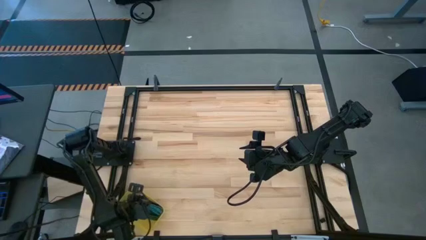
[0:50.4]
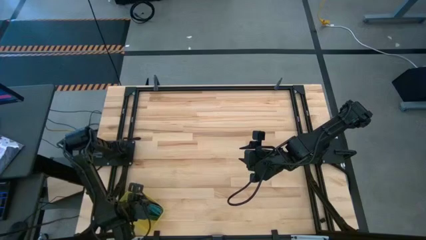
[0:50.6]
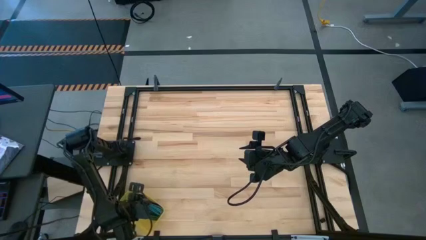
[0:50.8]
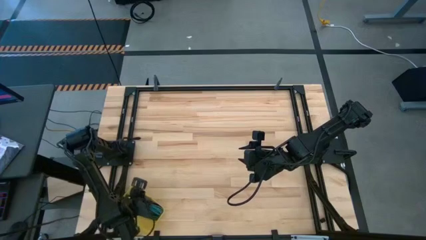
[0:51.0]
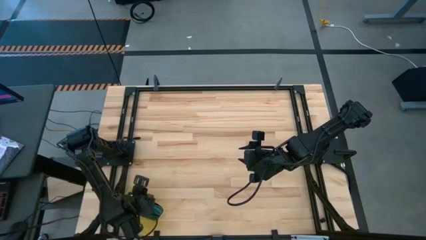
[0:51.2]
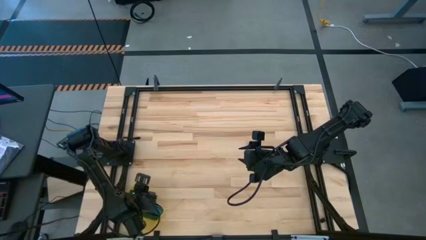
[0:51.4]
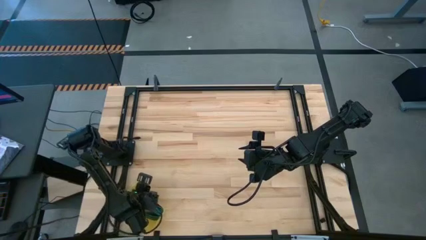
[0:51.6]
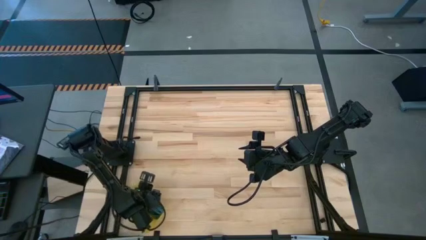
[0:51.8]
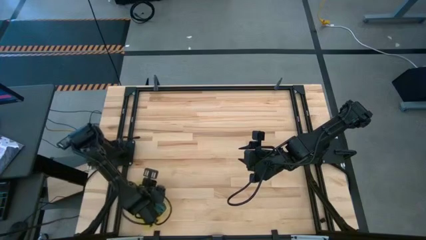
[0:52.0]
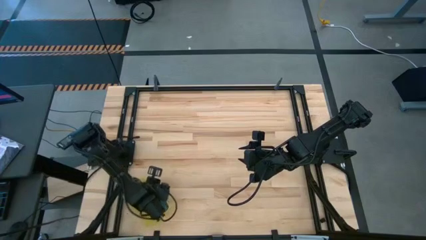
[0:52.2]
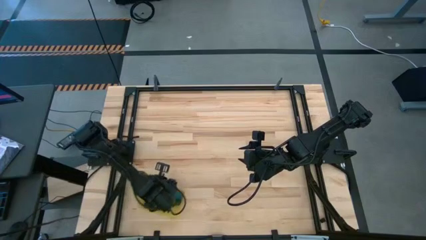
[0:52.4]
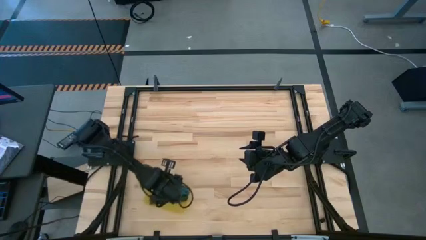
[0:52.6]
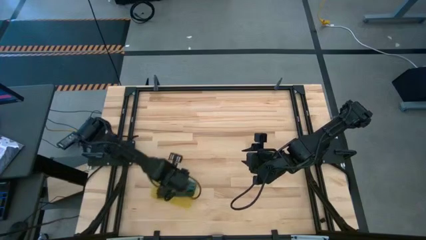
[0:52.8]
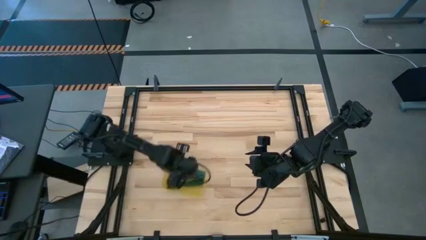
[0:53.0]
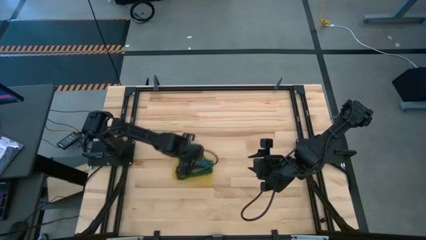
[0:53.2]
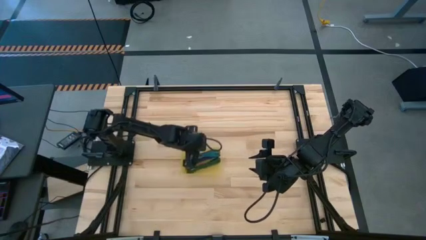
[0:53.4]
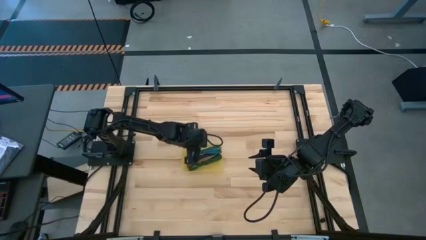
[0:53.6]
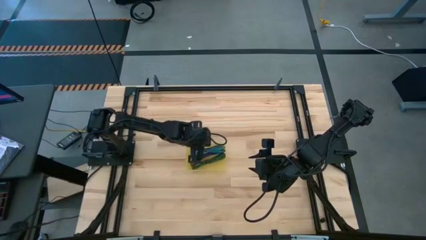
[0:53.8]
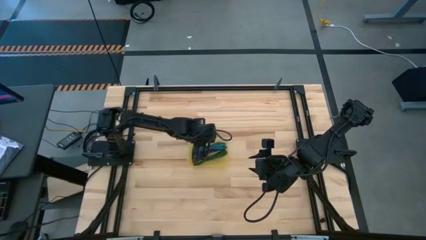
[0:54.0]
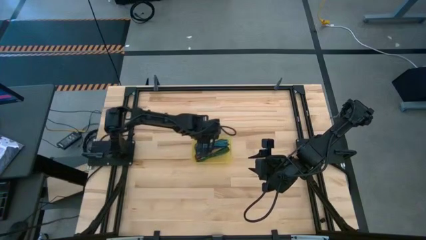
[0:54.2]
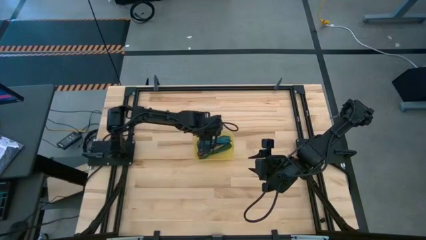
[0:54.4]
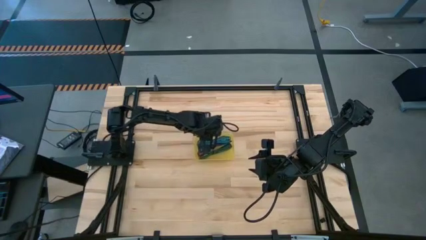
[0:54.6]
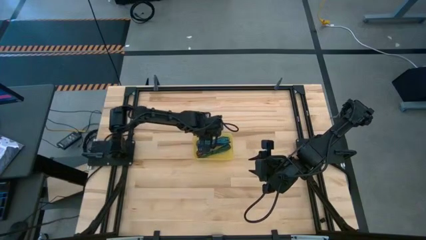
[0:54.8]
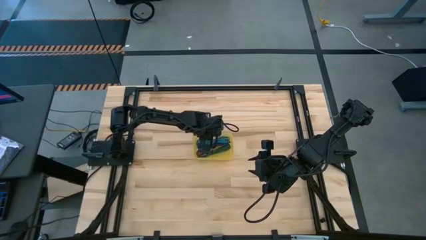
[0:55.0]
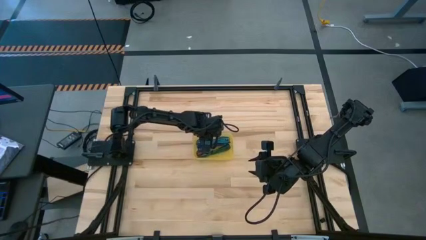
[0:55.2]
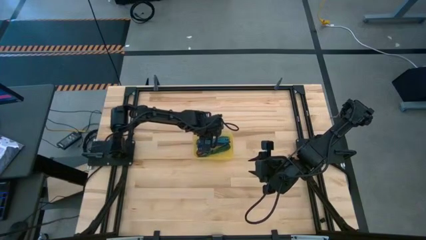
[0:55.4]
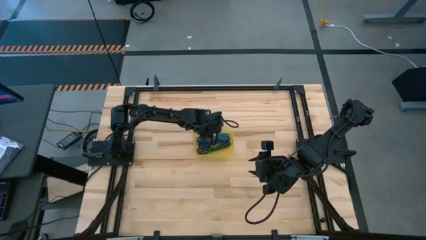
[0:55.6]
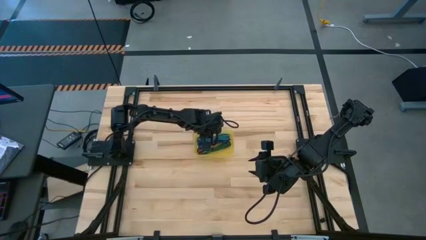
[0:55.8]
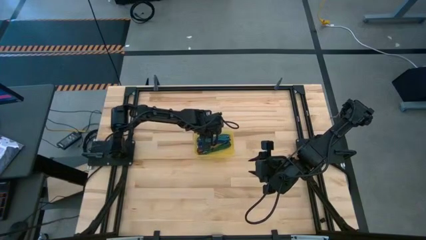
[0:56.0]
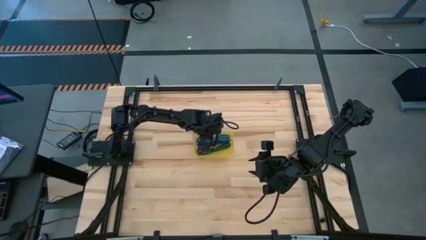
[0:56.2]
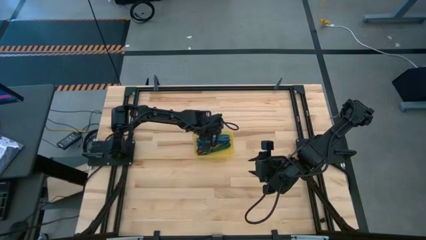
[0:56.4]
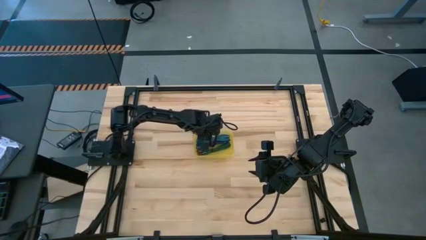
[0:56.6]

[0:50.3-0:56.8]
Task: Pick and place USB-C Cables
Move the yellow bin to the center of the table

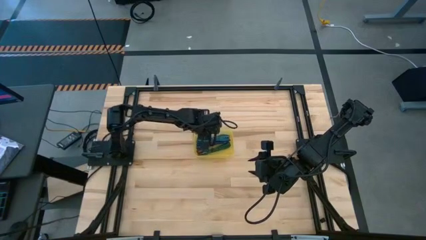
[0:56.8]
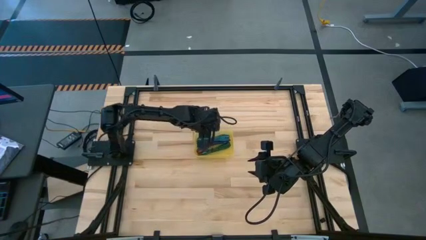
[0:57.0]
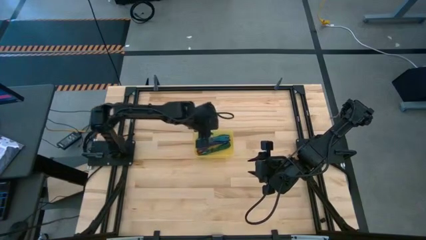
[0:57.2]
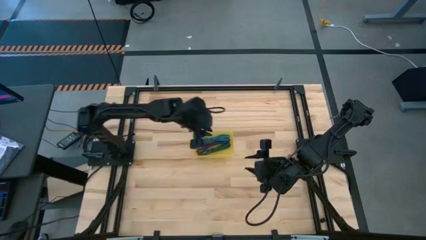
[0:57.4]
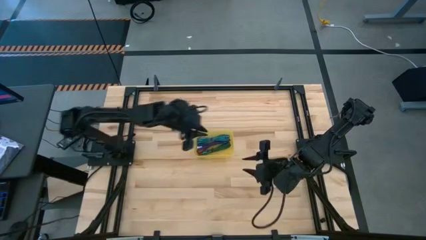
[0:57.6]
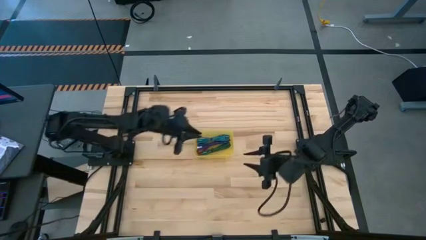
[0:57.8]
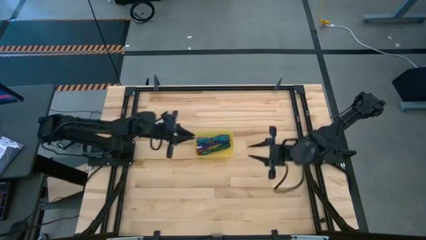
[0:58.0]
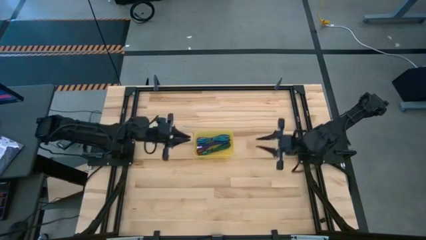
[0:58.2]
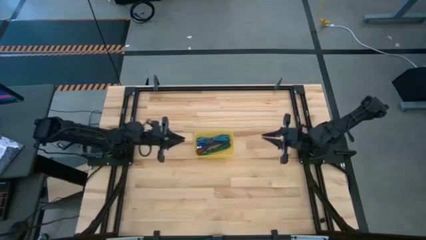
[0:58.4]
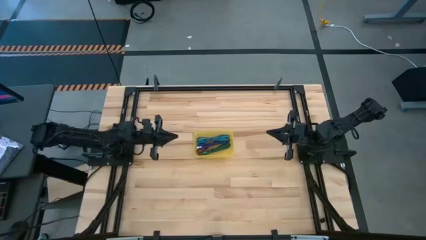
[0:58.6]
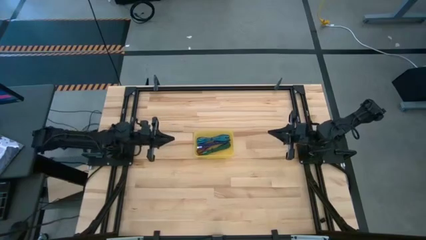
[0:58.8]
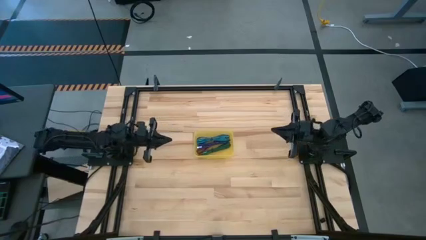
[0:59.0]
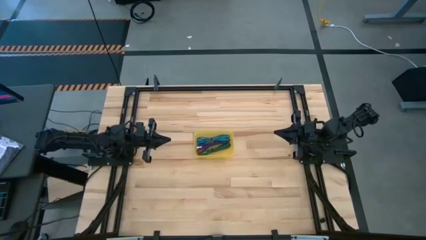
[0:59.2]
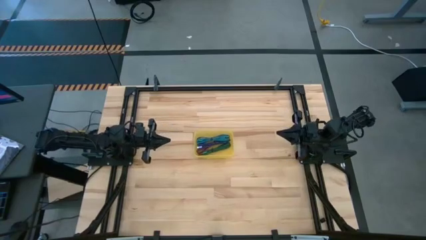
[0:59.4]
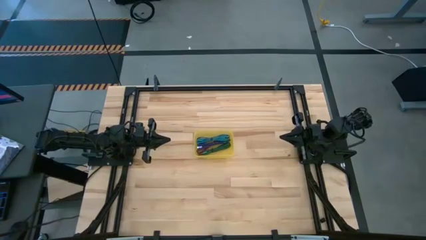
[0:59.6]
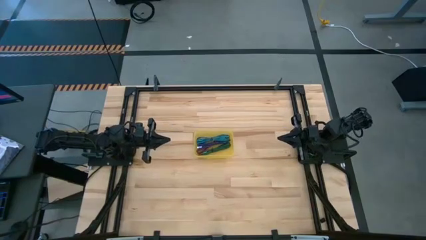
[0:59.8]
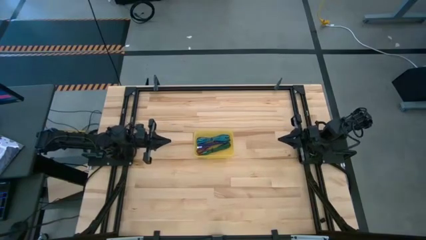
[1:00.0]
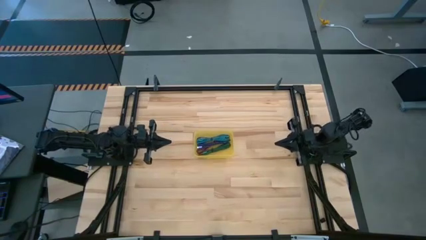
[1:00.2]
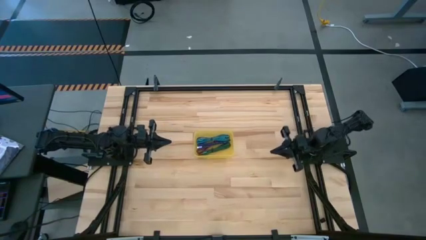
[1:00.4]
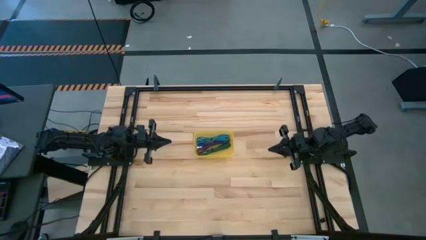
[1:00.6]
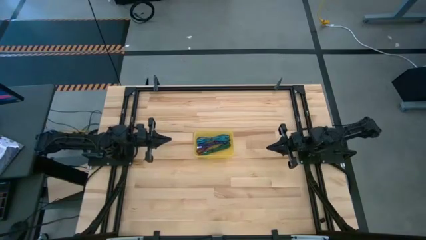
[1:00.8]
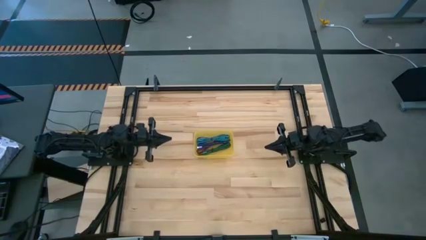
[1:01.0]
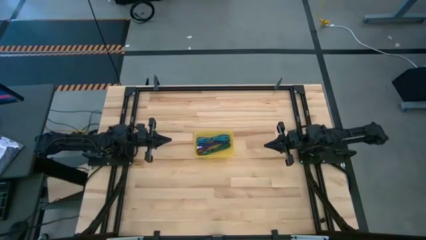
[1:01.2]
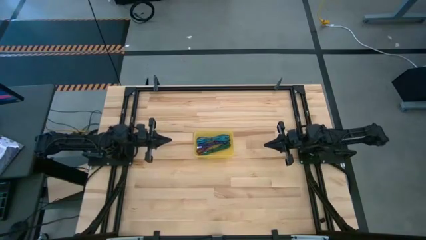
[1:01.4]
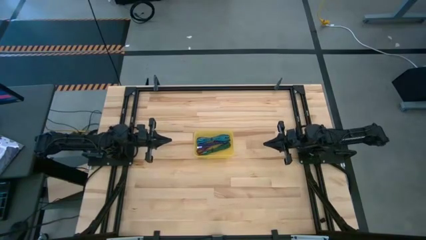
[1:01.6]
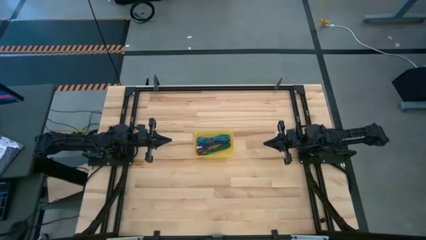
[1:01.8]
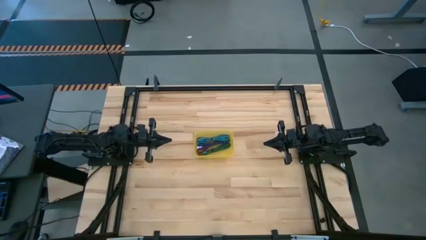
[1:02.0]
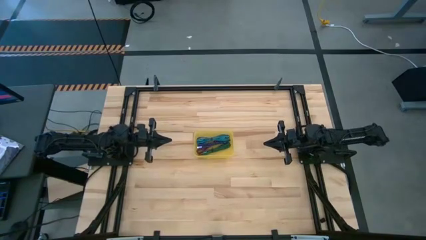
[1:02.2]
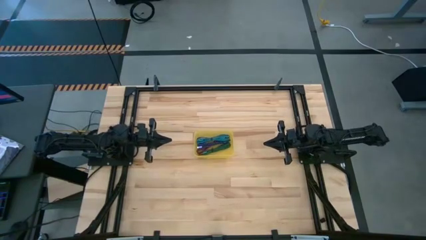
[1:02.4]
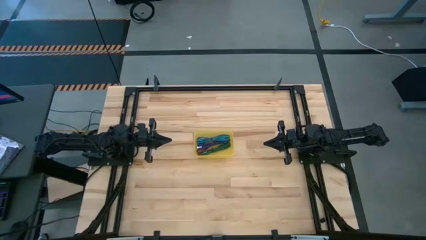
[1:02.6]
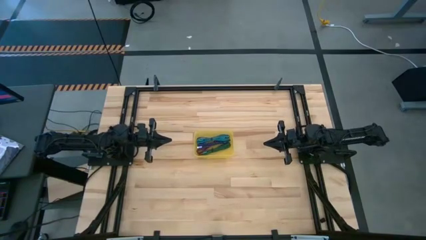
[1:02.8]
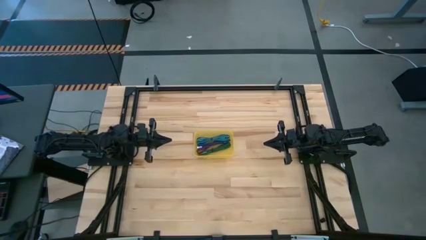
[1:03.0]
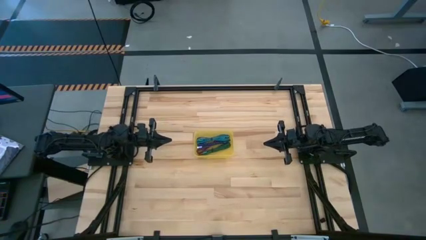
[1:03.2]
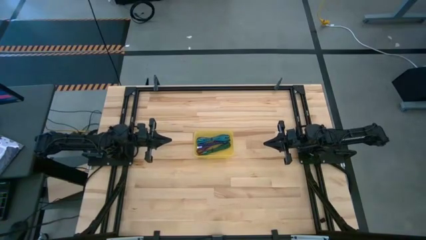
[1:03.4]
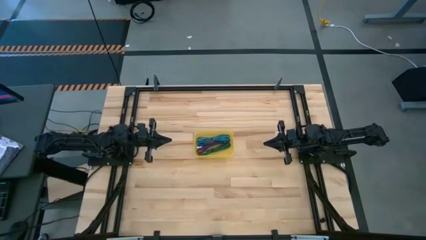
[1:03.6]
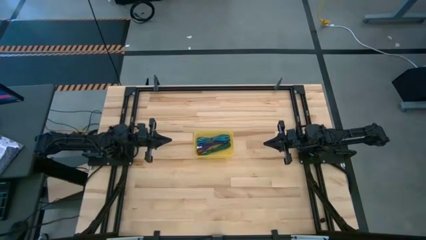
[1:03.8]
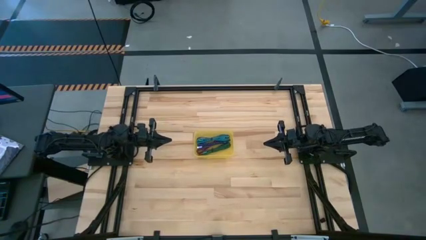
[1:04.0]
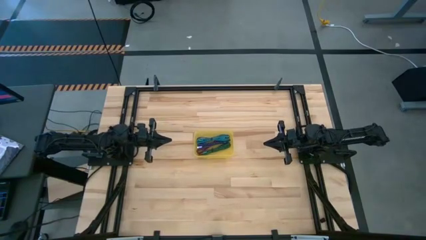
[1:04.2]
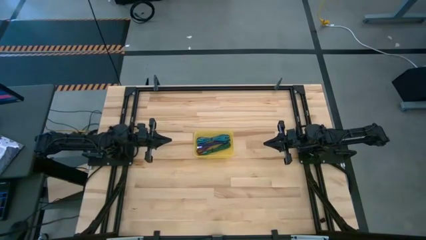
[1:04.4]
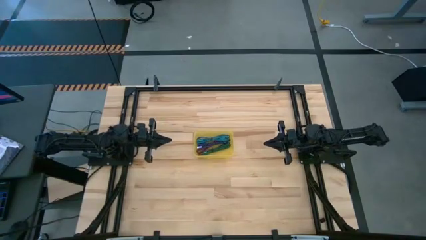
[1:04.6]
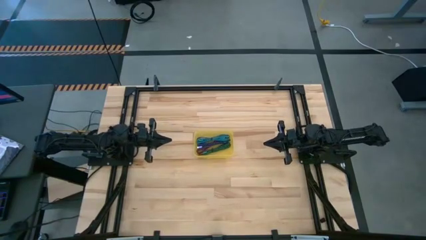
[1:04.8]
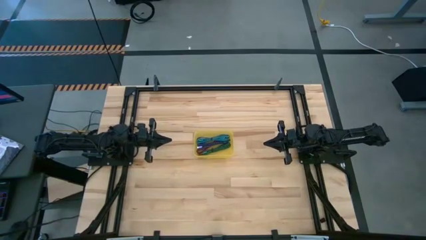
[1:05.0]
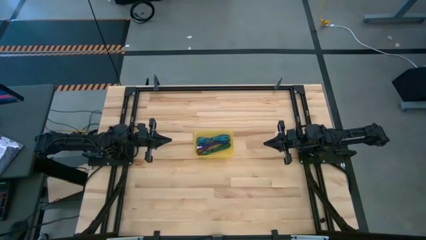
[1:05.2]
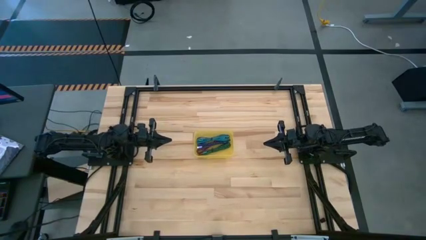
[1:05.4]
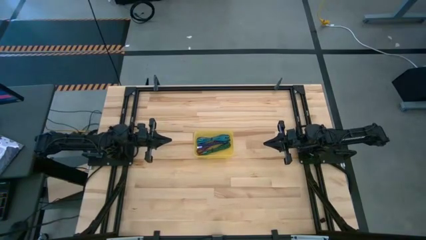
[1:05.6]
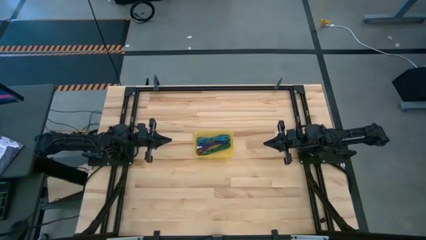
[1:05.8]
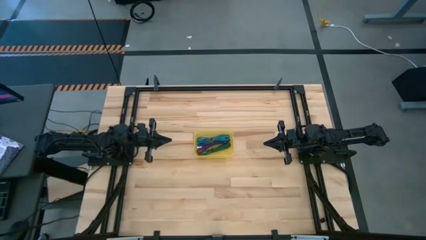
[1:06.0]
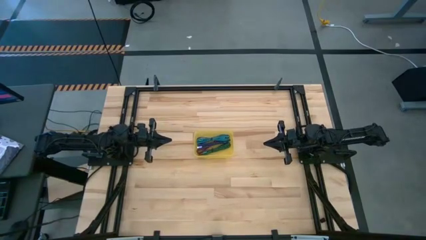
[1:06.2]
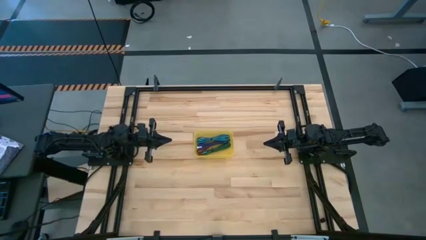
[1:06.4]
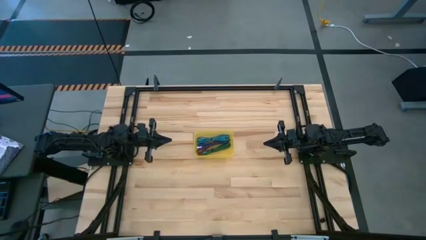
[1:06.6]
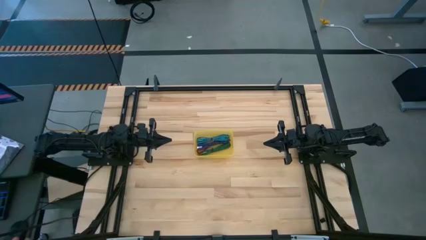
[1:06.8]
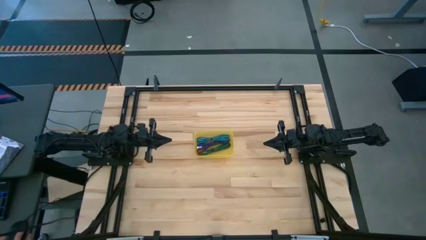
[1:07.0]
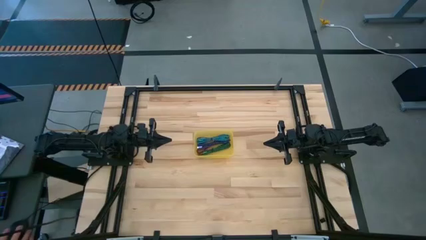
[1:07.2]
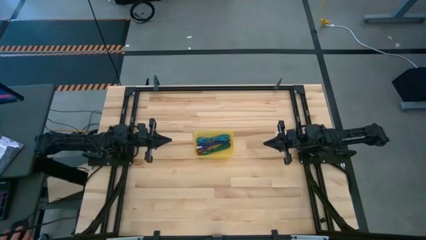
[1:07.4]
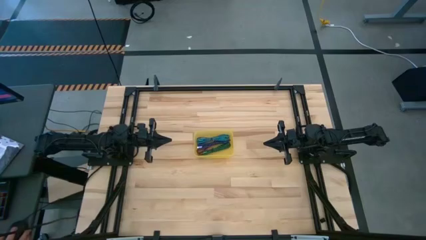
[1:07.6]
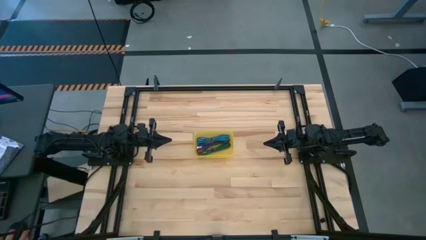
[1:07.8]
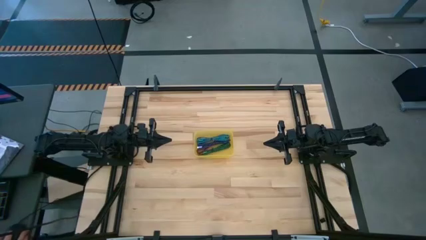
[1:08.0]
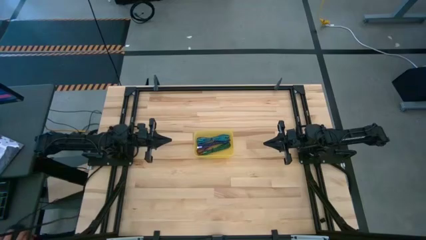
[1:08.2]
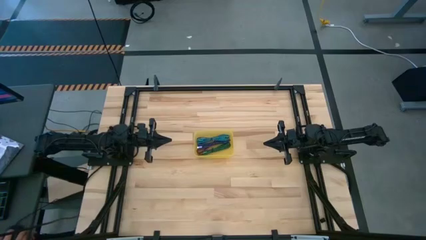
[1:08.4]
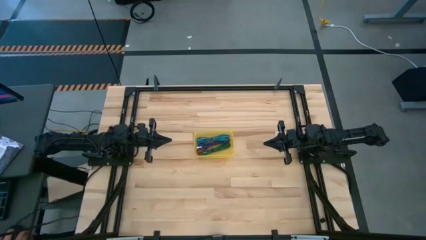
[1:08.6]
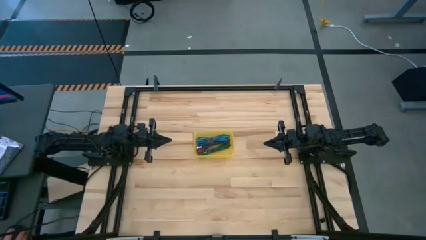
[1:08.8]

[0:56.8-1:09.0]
Return to Home Position
